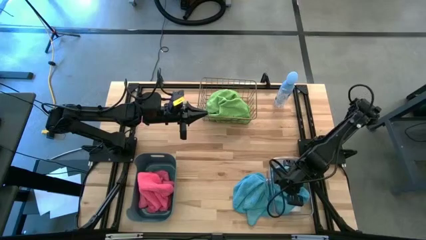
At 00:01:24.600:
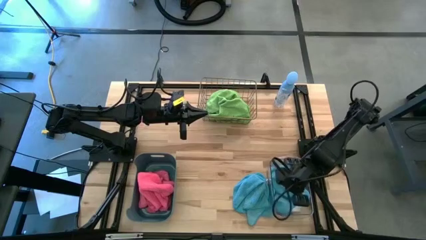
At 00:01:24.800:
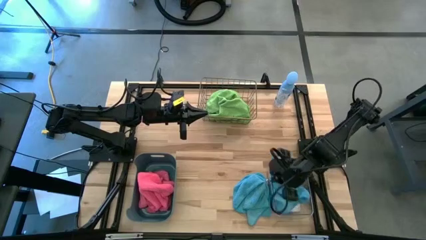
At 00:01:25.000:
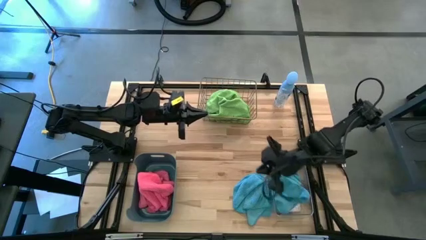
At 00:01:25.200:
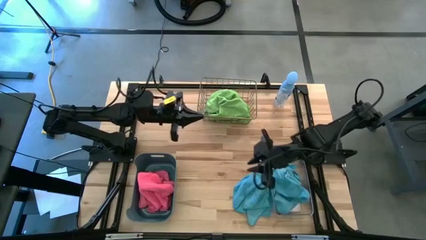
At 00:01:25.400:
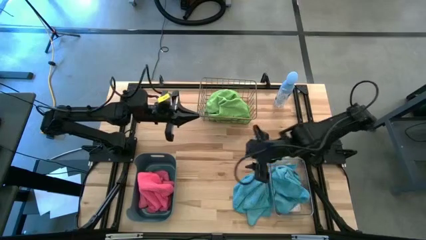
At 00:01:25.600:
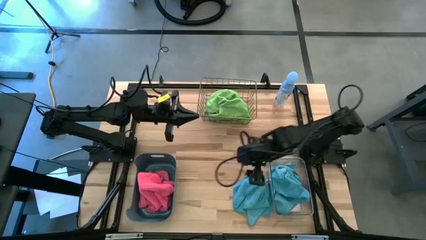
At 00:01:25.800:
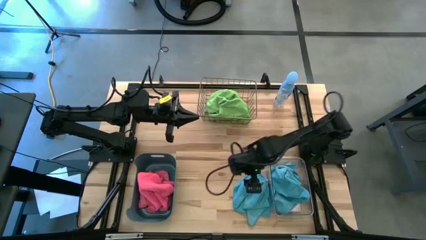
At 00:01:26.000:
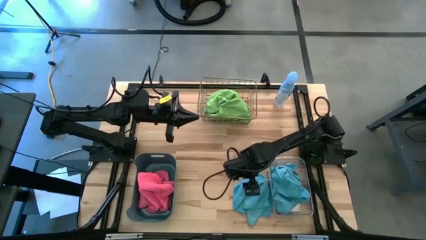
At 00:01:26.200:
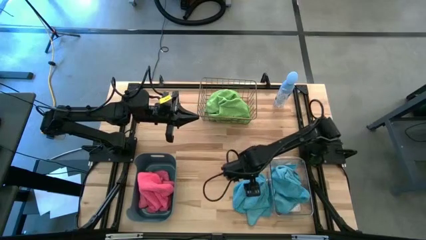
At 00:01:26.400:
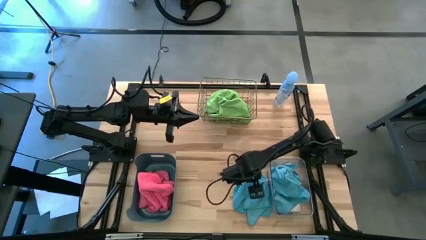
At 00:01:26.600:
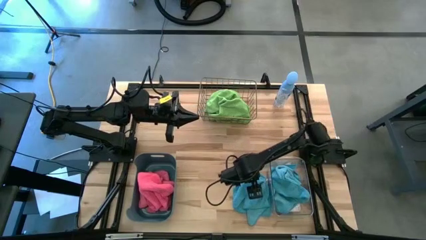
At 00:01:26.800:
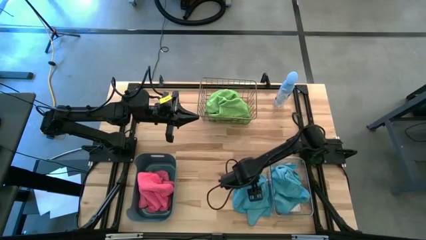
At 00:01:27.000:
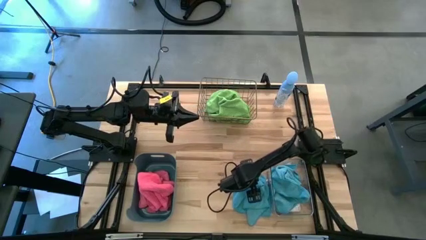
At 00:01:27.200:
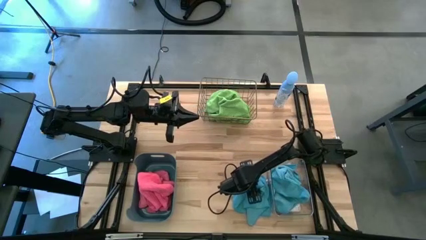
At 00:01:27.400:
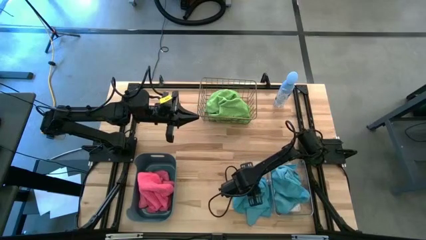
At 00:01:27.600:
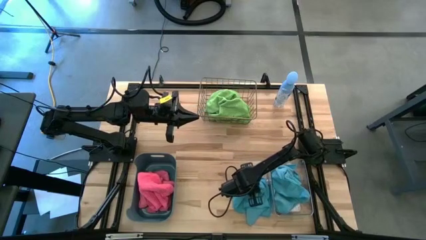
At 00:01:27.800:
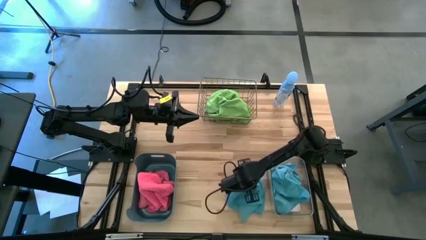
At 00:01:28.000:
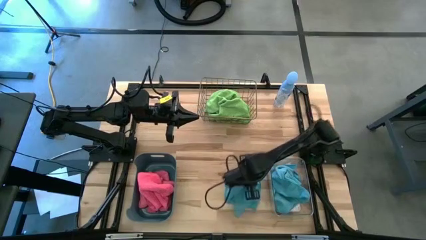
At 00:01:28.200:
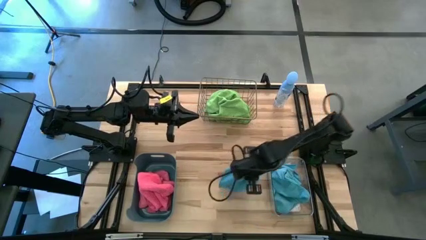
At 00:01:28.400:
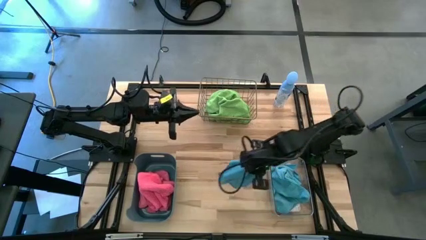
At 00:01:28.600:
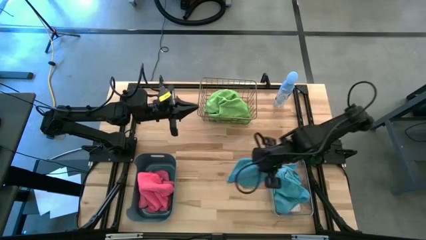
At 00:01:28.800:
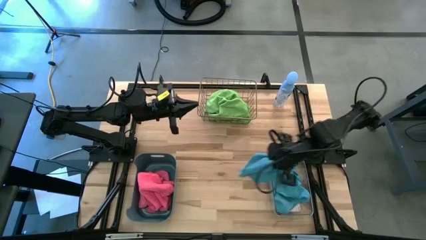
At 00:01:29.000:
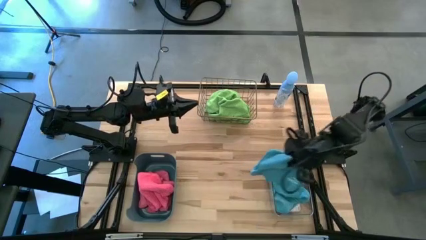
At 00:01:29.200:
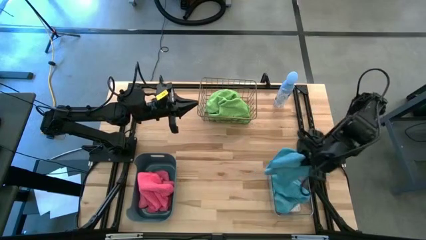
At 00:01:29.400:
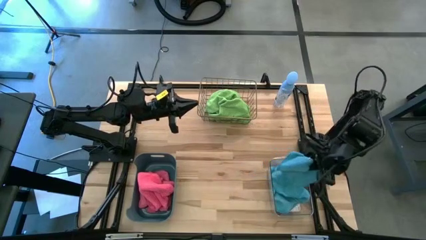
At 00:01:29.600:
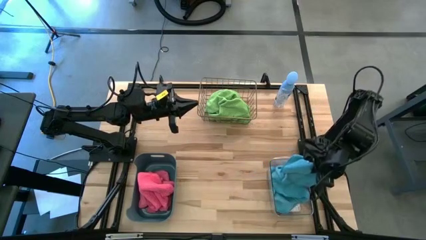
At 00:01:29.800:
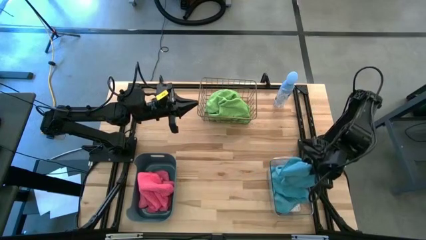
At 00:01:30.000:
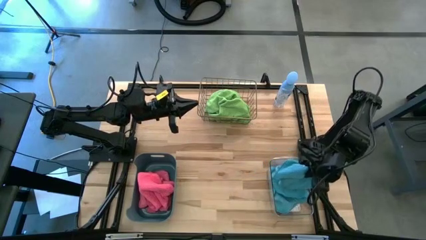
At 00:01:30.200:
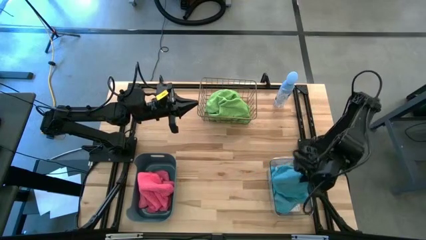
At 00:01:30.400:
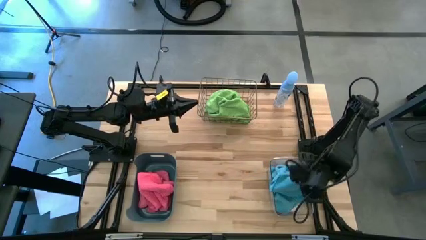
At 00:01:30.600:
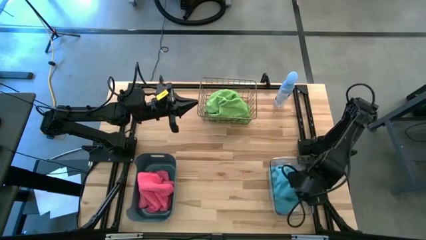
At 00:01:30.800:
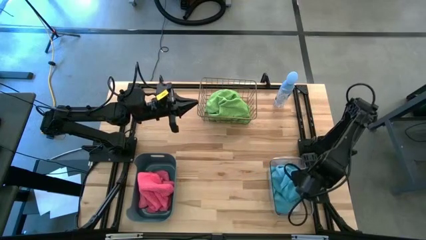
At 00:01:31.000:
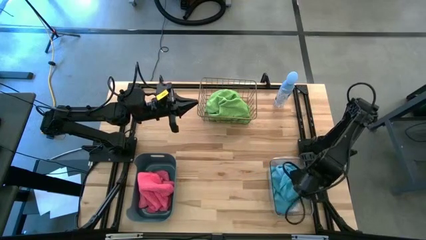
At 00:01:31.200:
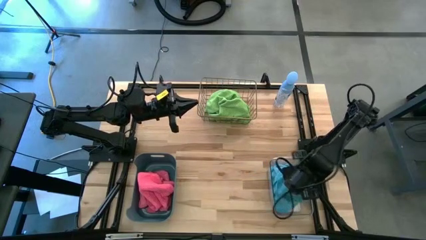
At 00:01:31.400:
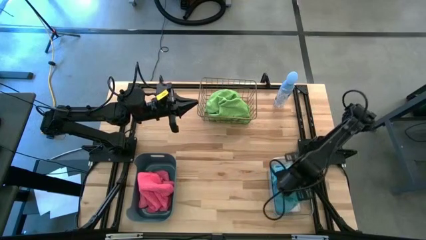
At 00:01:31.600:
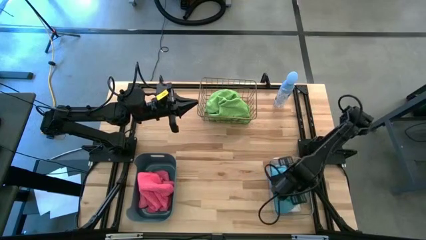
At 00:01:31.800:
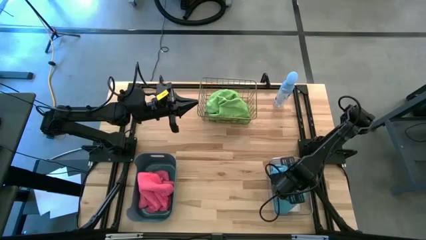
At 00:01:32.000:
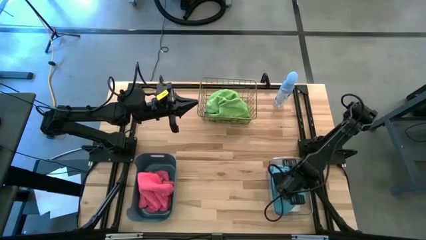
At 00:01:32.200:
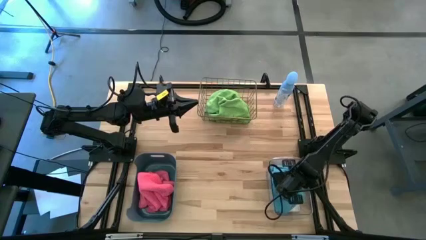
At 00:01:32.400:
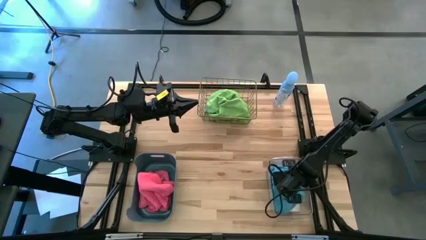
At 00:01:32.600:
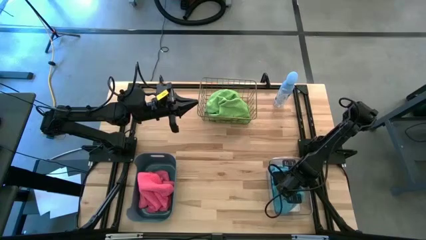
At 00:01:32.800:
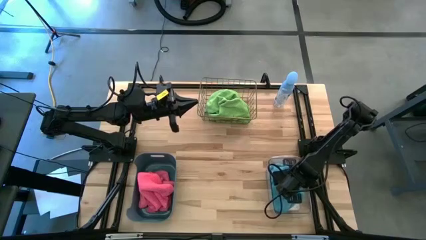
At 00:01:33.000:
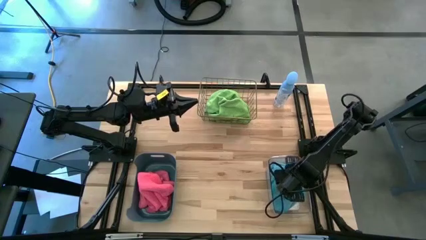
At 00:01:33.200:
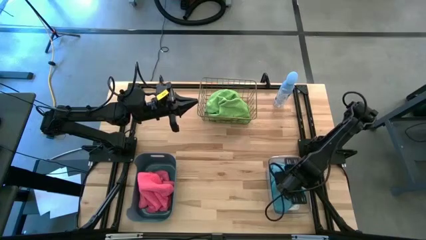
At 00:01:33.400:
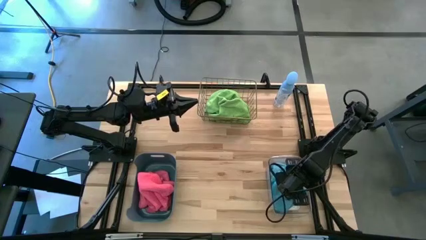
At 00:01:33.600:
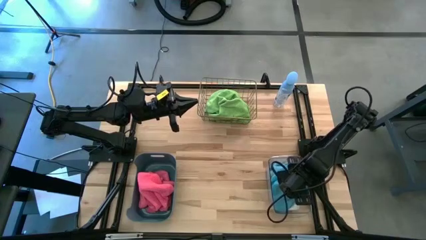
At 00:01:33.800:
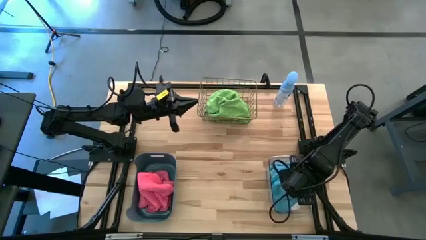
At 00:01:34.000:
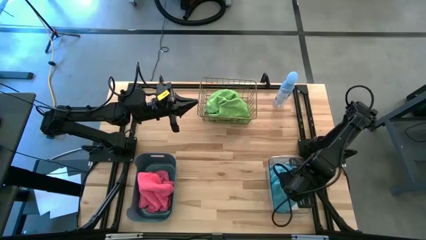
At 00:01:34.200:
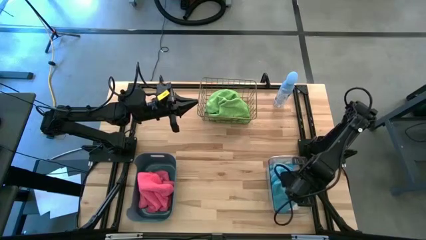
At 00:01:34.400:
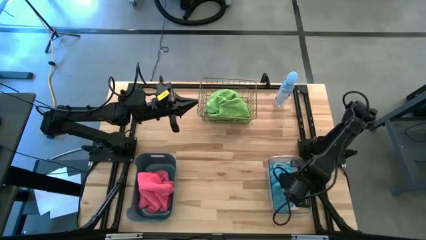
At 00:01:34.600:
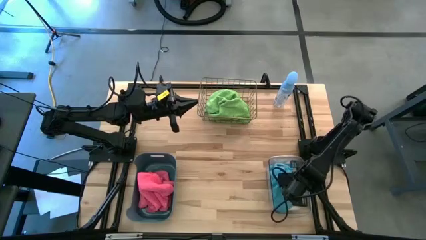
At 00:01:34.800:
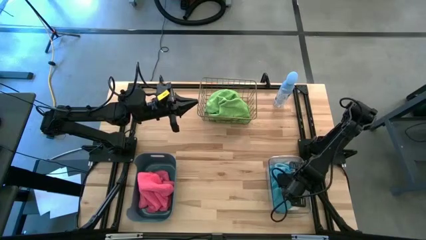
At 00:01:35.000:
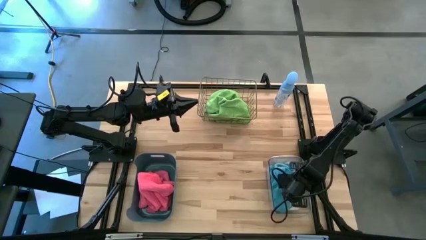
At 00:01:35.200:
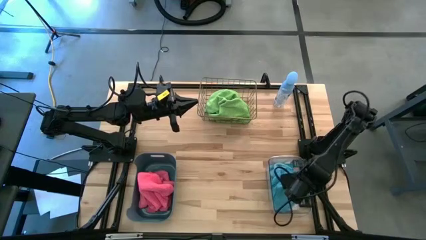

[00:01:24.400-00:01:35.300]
Task: Sort microfiber towel by color & place in baskets
Put the blue towel into the transparent bin

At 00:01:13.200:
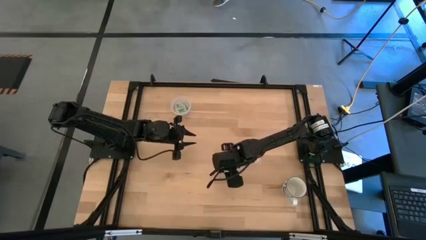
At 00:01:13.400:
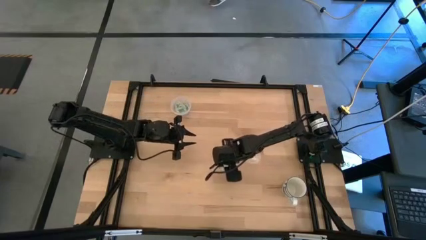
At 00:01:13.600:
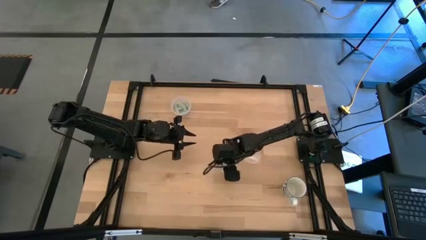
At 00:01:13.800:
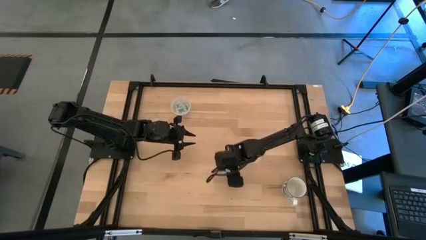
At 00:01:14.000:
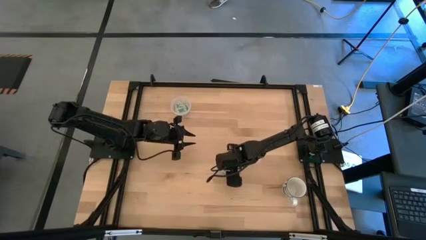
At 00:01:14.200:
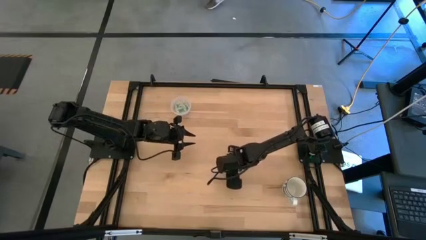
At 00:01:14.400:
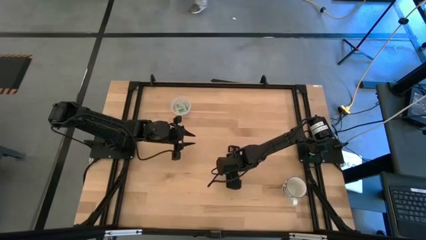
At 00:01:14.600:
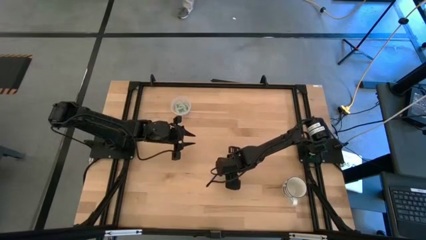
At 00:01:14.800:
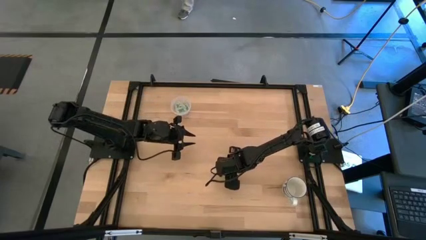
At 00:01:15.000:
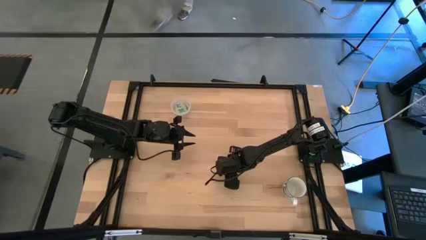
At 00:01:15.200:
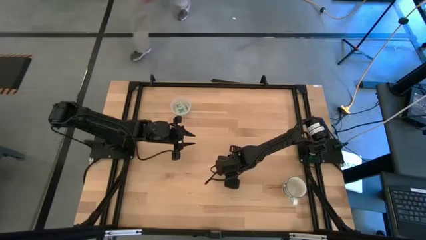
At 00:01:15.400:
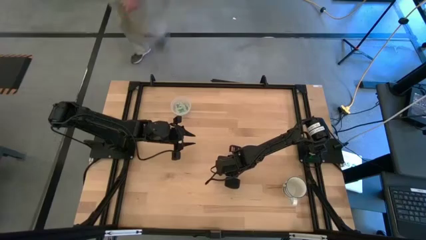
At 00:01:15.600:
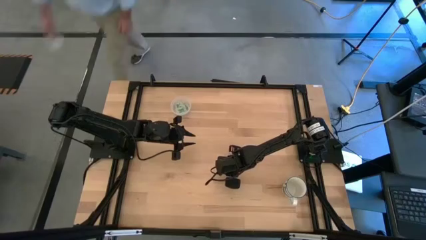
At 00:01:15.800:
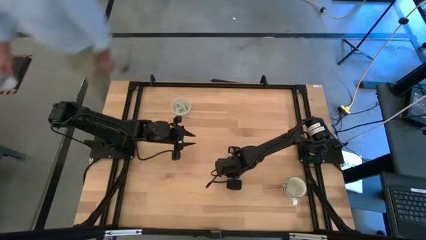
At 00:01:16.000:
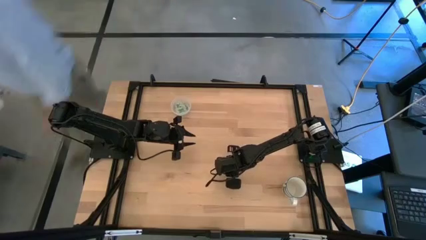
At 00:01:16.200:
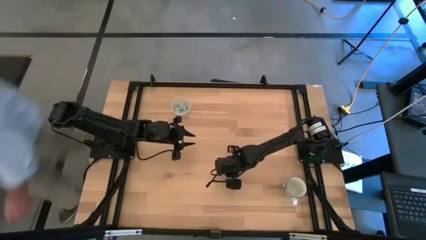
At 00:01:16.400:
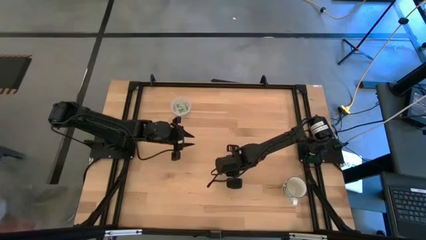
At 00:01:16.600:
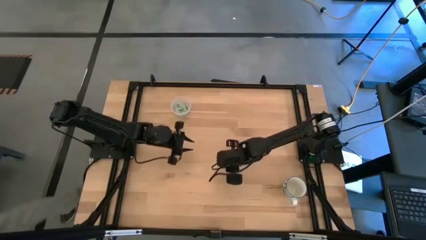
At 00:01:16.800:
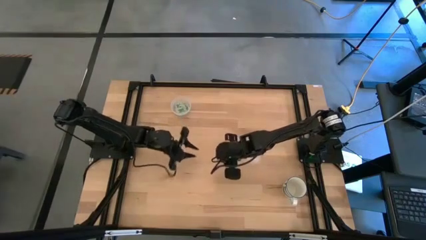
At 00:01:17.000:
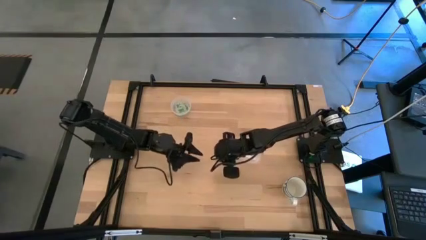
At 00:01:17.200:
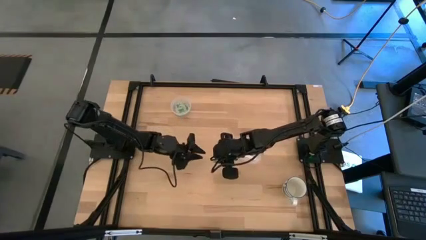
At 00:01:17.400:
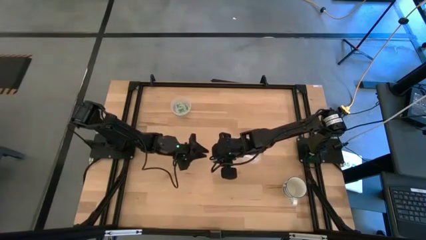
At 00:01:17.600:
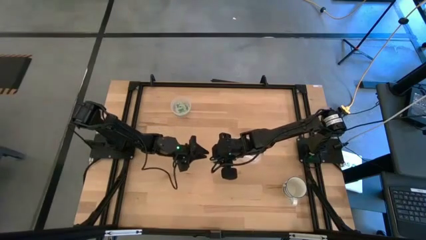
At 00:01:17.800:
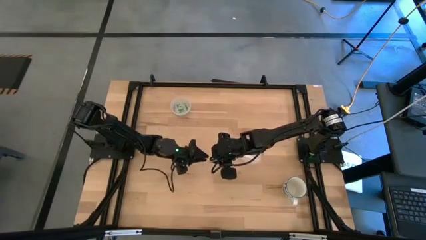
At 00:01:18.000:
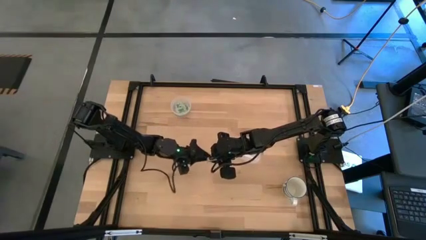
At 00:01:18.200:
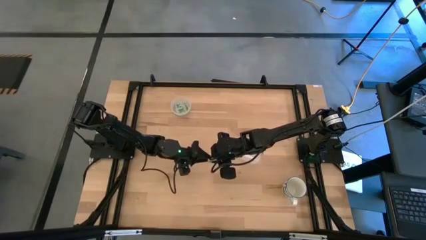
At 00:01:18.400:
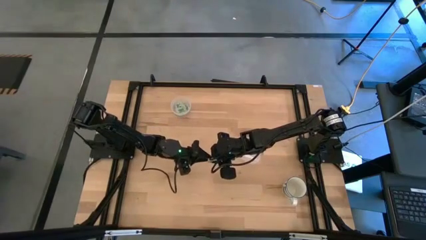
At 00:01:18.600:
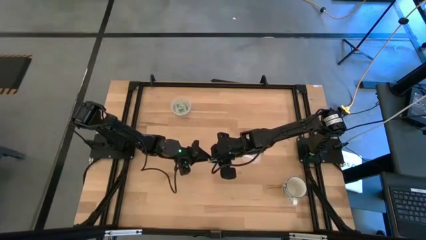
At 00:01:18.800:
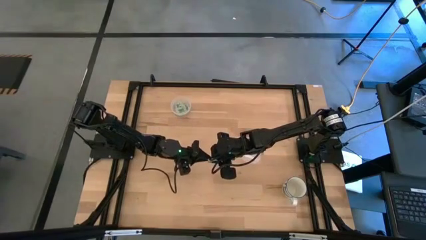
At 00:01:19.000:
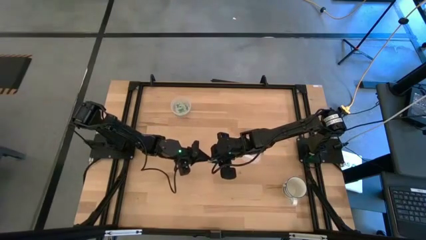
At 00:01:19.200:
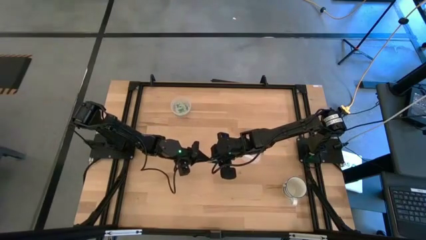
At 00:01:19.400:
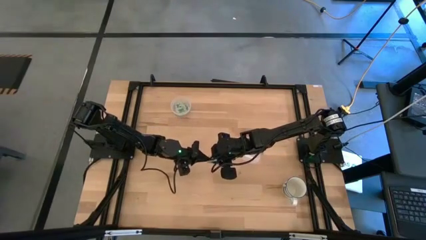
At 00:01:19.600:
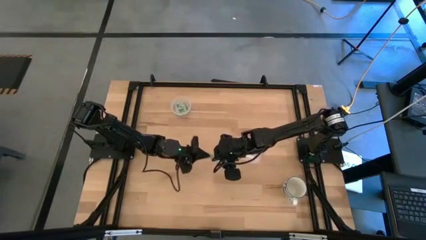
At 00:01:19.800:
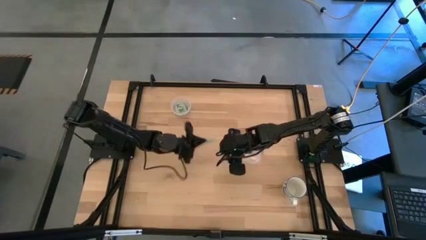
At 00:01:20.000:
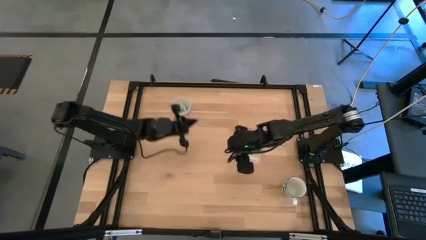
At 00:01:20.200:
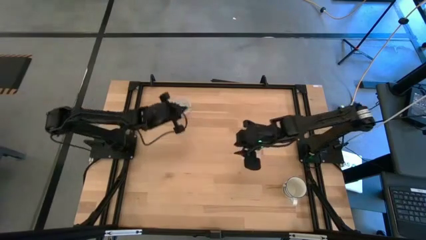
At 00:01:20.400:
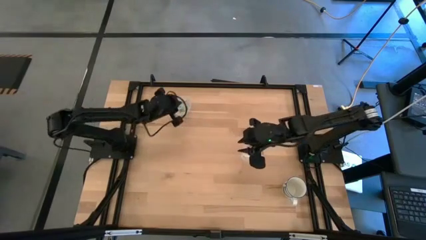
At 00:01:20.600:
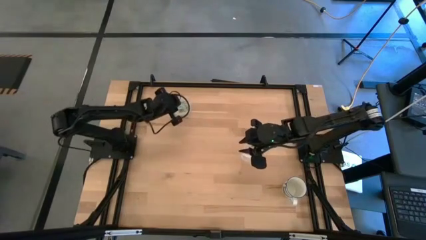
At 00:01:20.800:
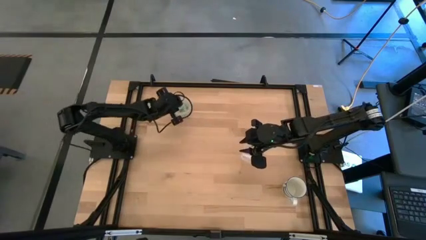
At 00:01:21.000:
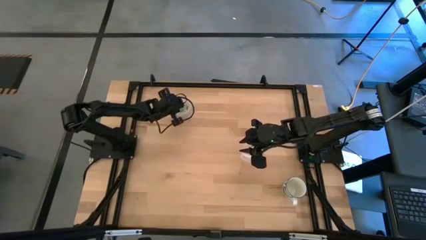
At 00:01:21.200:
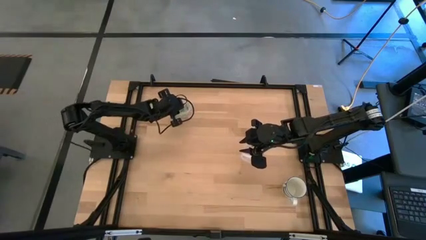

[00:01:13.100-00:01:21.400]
Task: Pick and place Stevia / Truvia into bins
Put the stevia packet into the top transparent container
